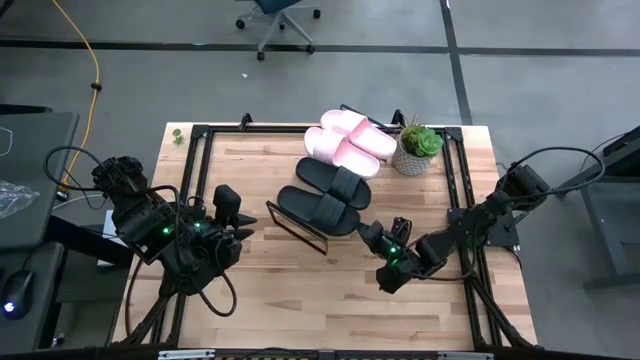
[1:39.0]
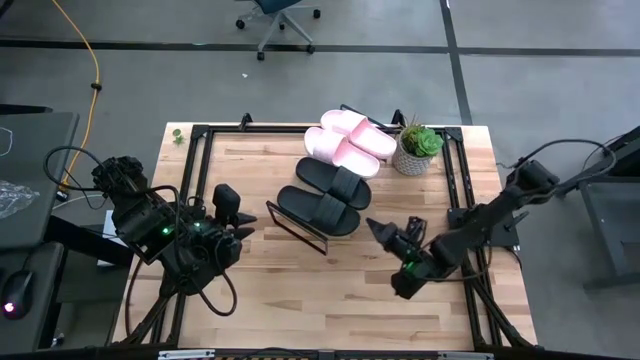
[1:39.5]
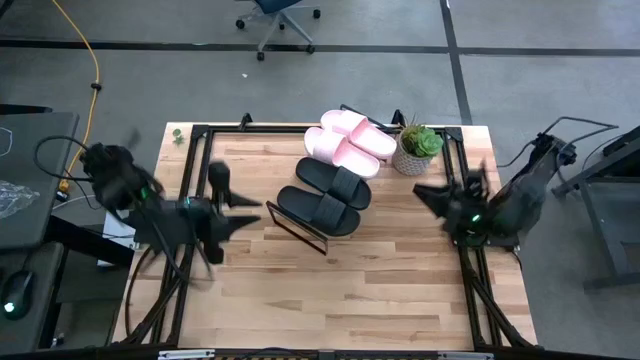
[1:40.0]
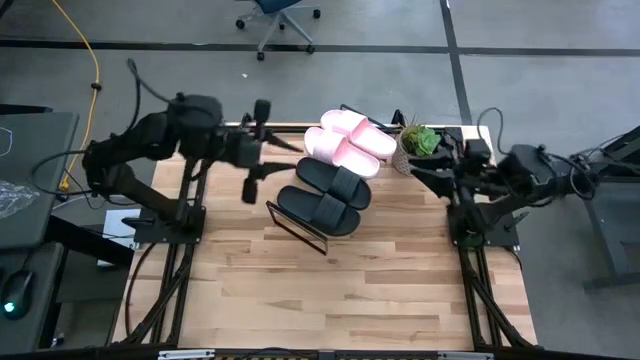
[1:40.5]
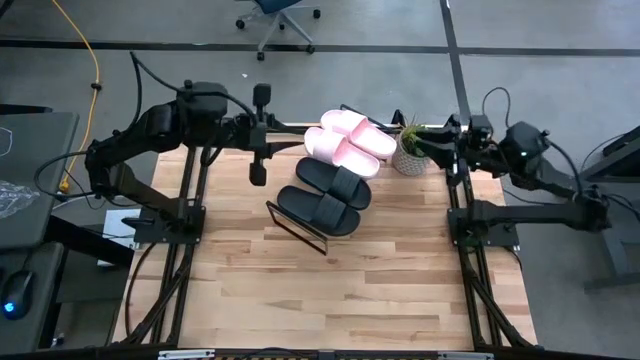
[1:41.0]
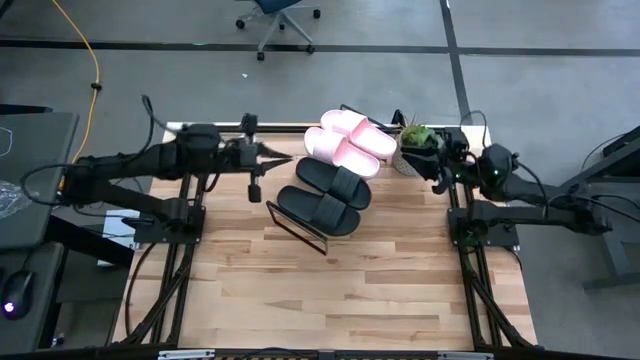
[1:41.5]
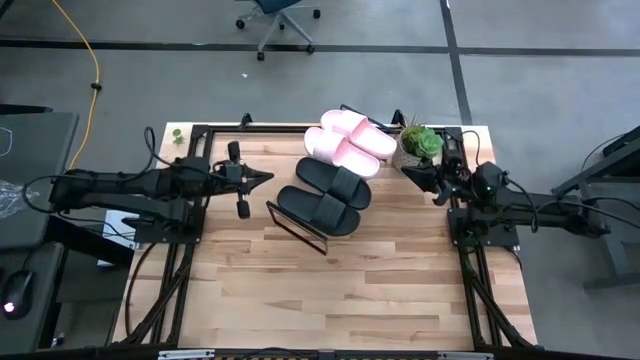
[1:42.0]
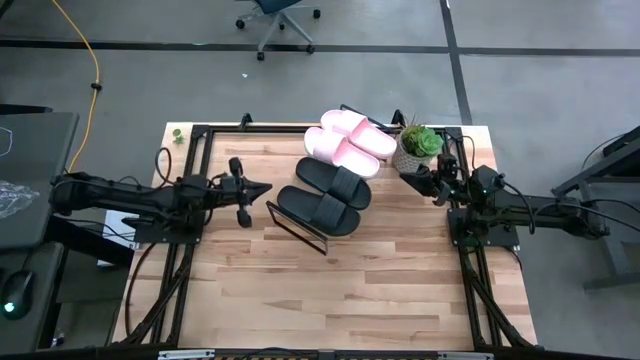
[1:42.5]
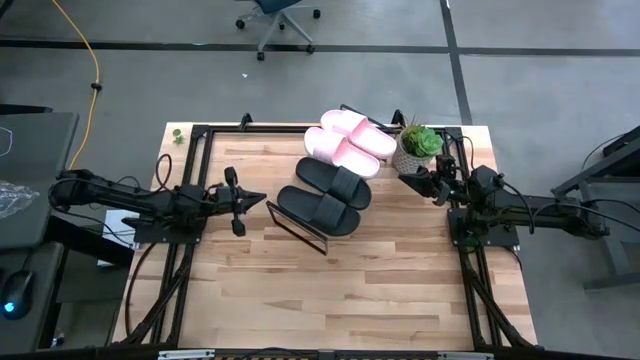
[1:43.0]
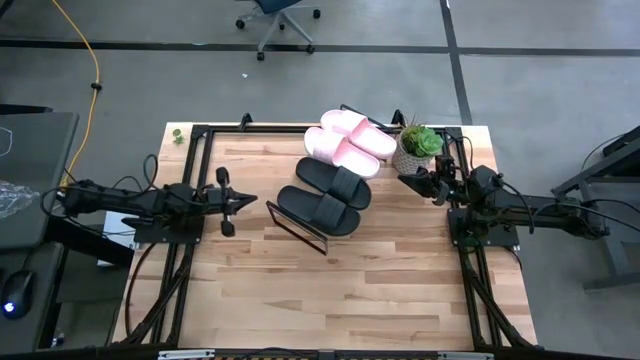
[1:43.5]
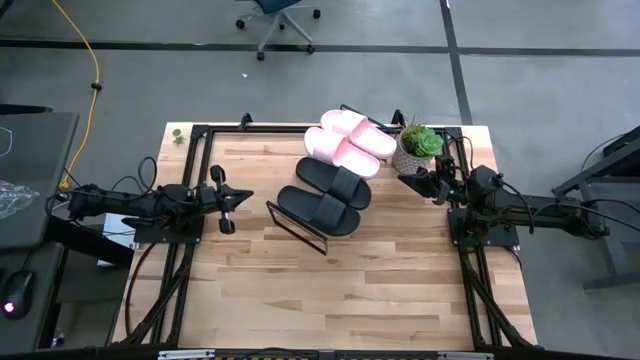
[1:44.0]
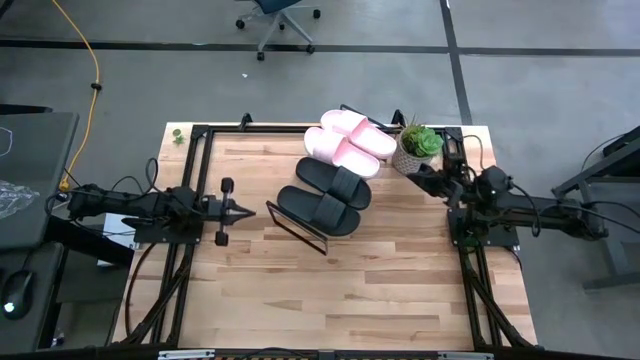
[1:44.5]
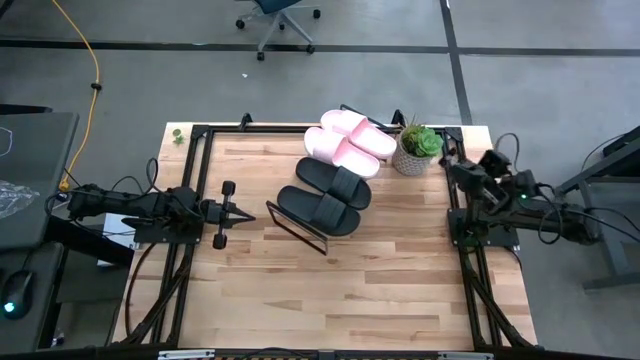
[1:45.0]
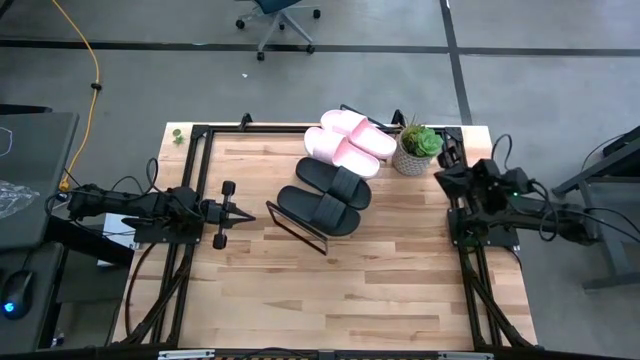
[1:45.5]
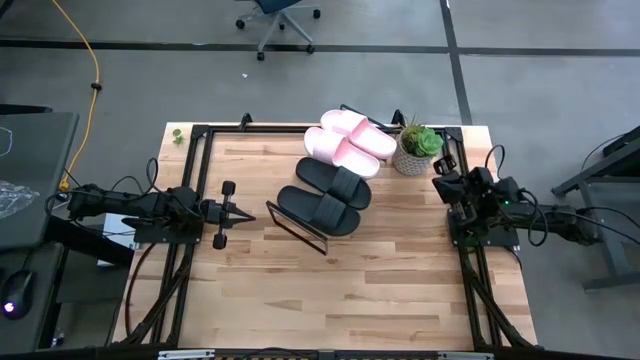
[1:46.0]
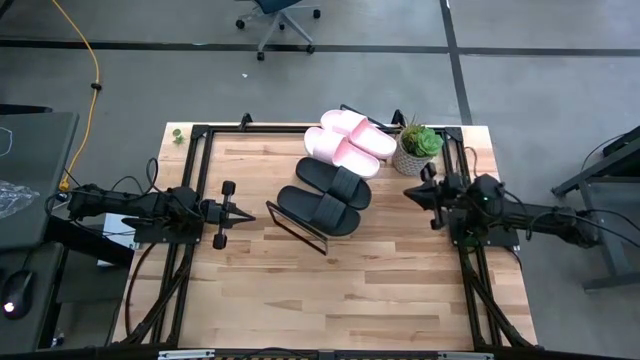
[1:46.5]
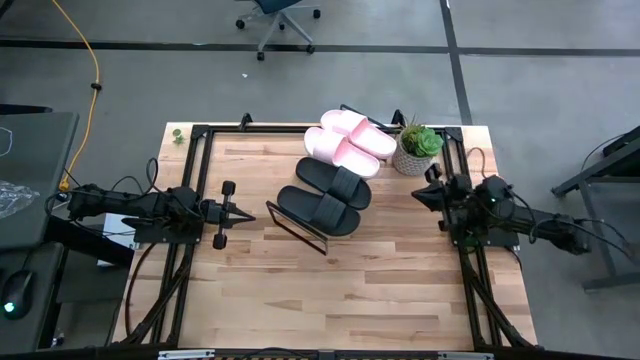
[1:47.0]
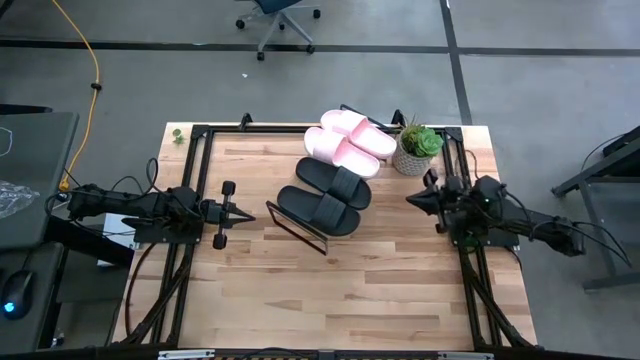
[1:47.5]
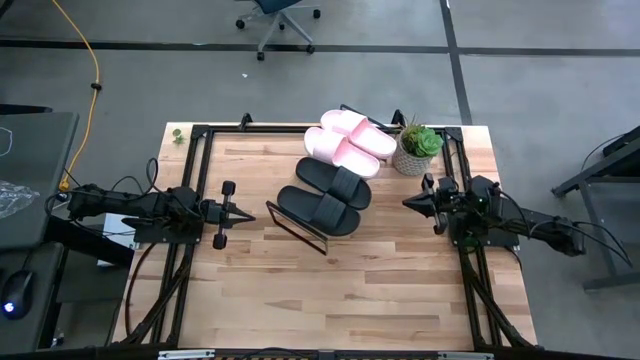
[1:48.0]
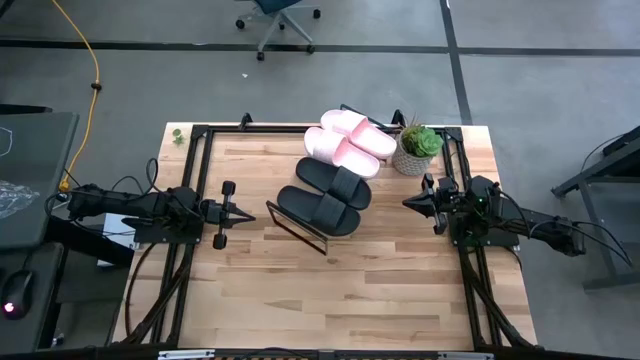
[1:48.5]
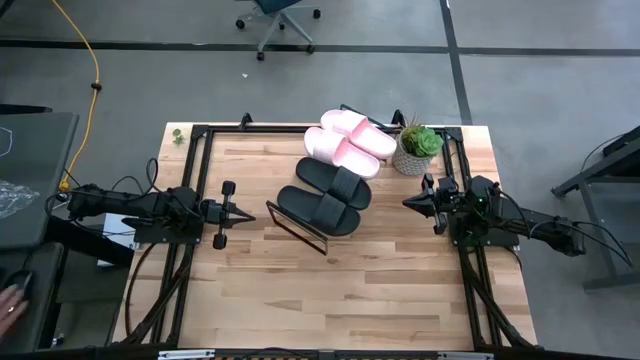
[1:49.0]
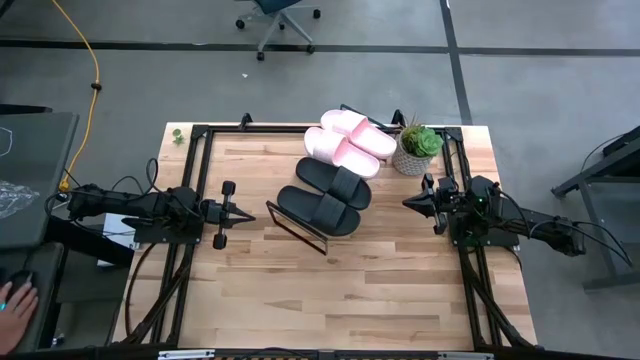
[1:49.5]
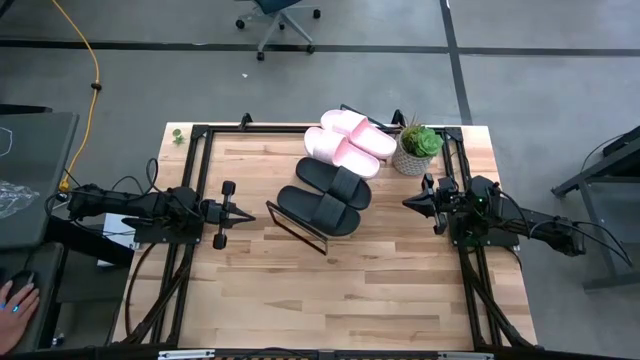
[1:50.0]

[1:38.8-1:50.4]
Task: Pick and place slides into the shelf
Return to Home Position

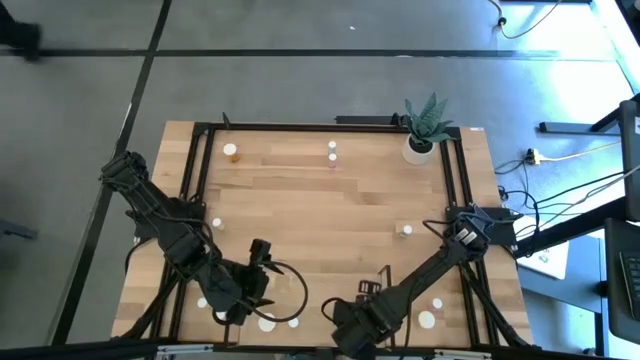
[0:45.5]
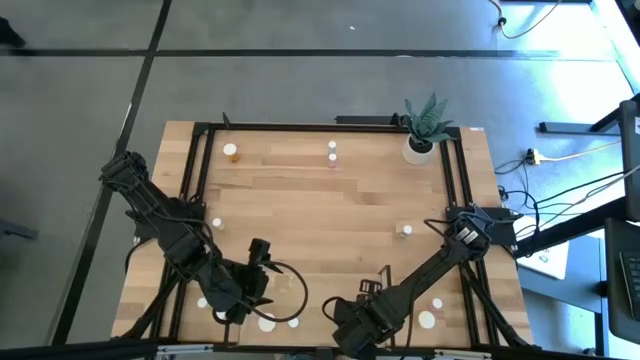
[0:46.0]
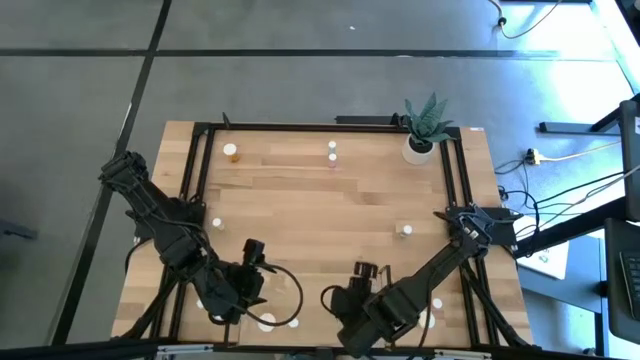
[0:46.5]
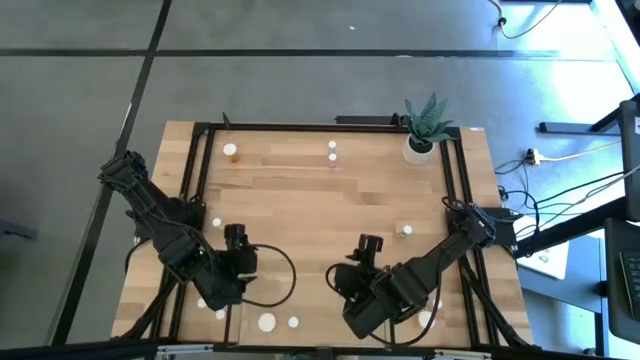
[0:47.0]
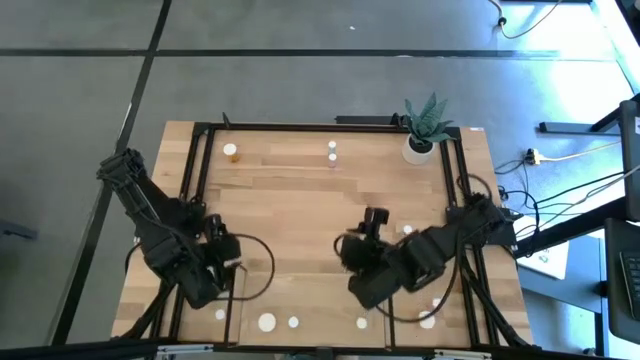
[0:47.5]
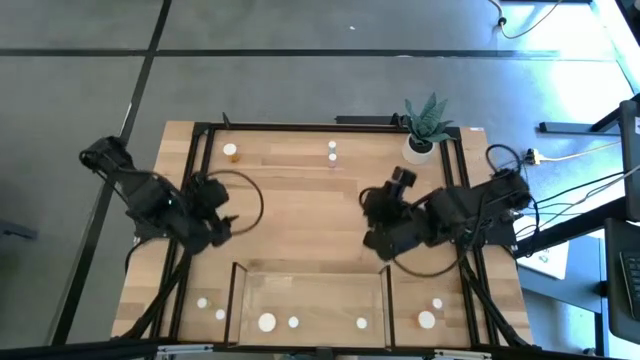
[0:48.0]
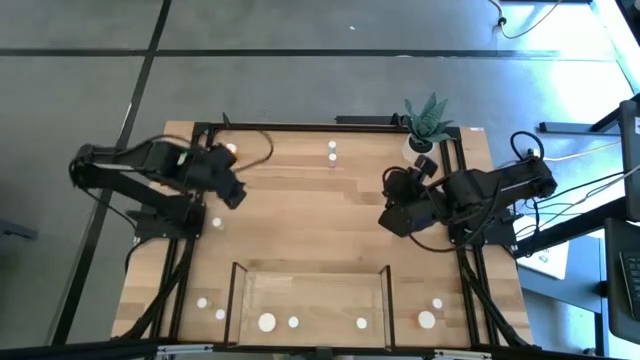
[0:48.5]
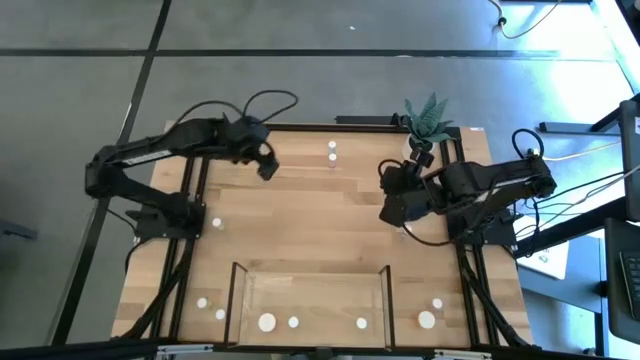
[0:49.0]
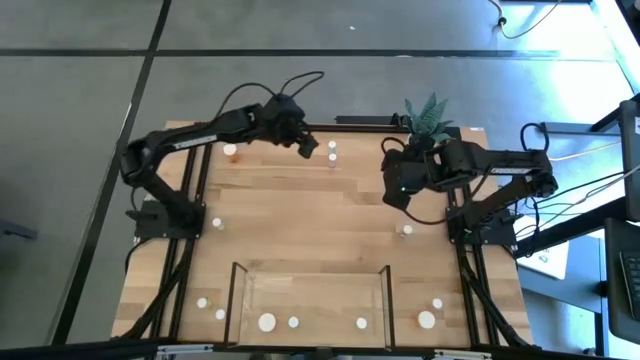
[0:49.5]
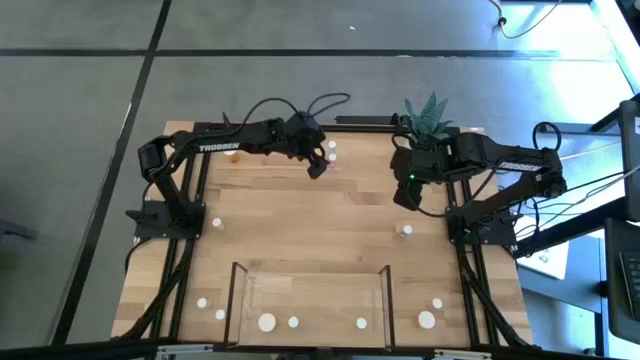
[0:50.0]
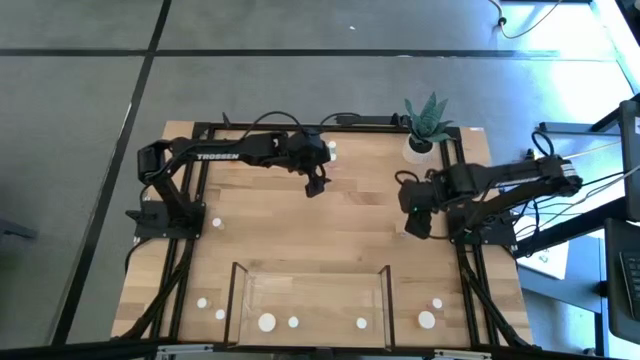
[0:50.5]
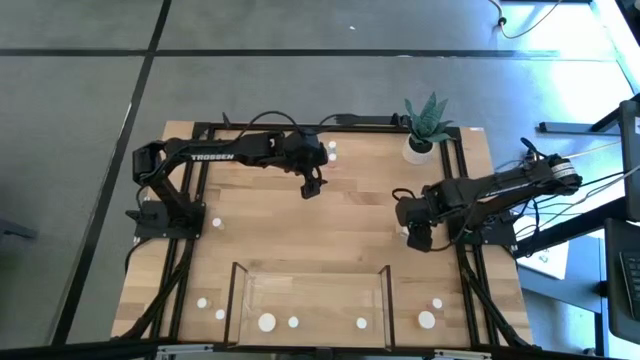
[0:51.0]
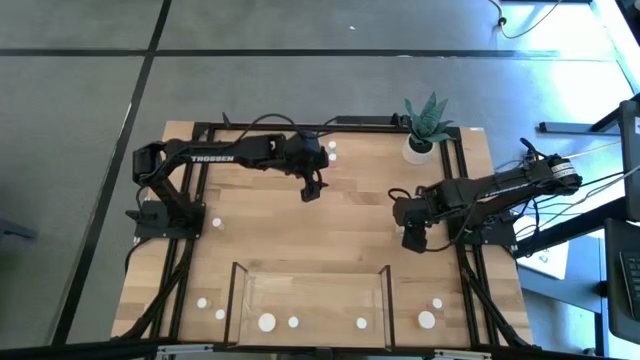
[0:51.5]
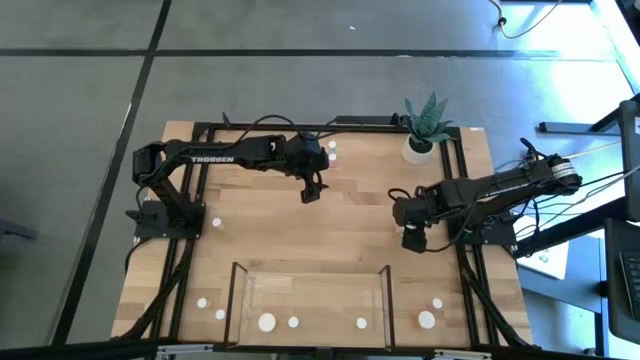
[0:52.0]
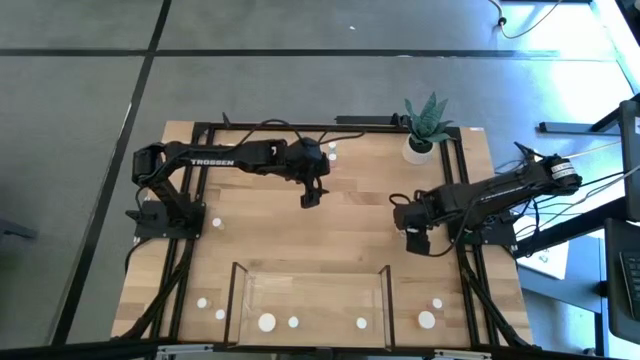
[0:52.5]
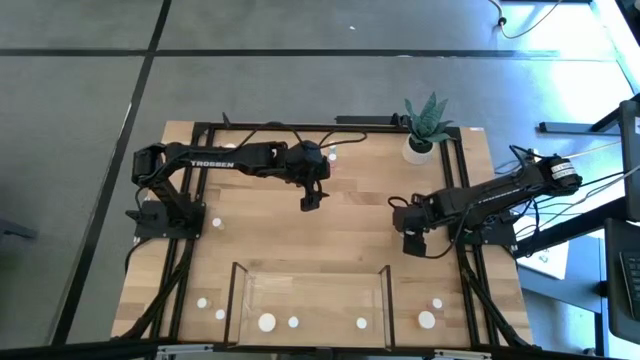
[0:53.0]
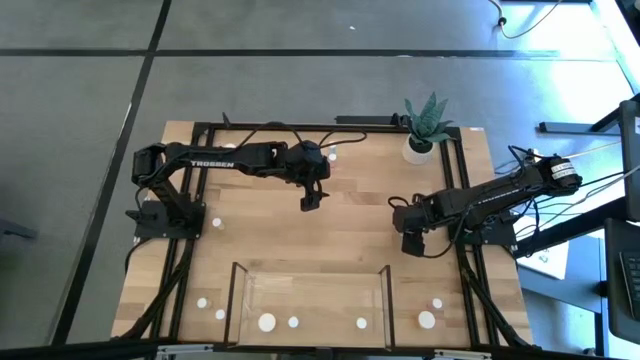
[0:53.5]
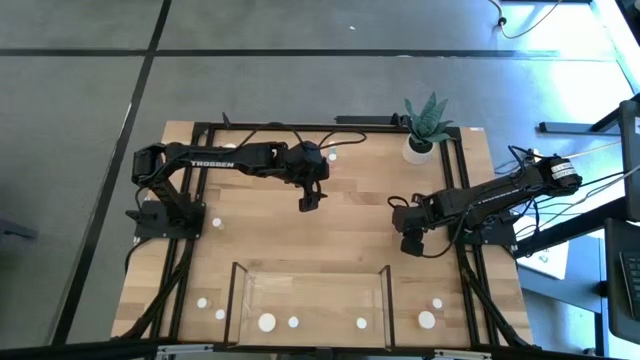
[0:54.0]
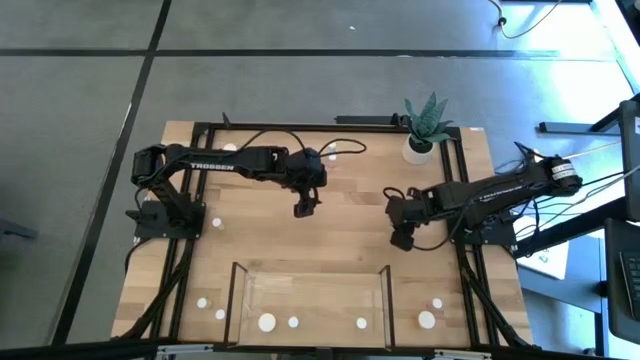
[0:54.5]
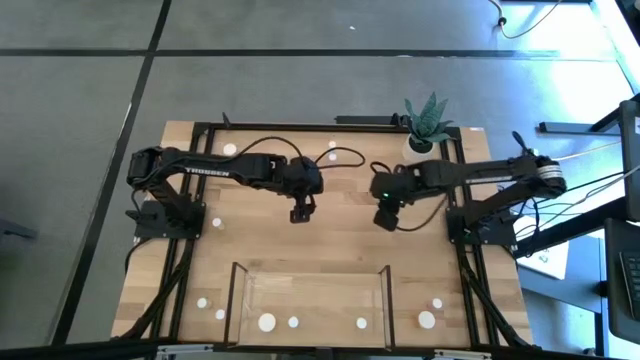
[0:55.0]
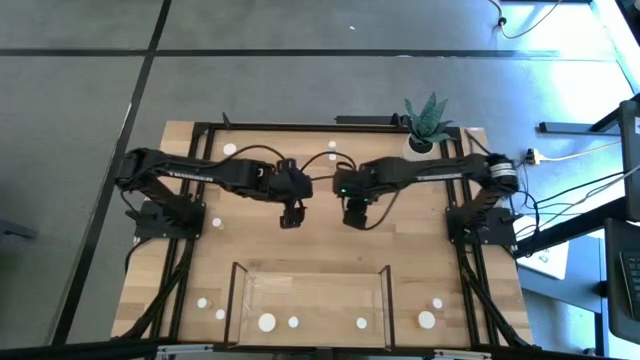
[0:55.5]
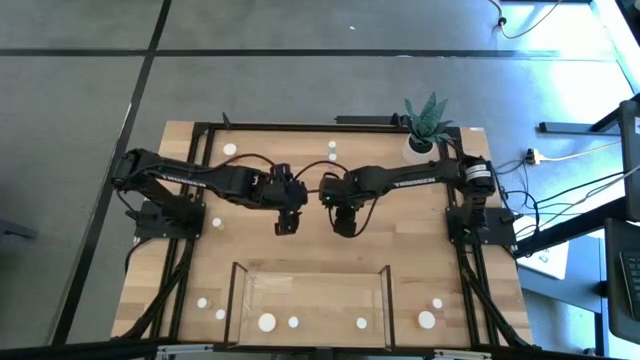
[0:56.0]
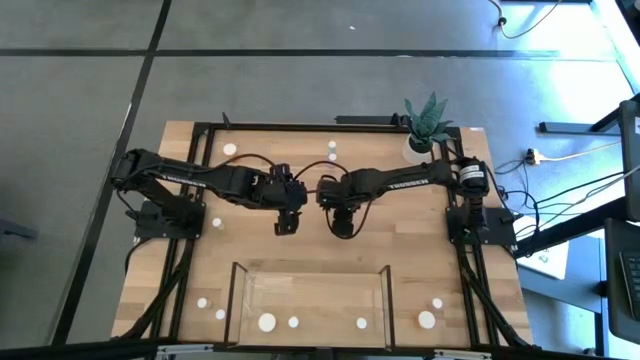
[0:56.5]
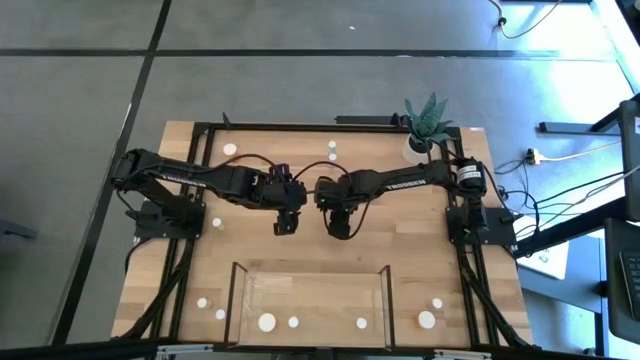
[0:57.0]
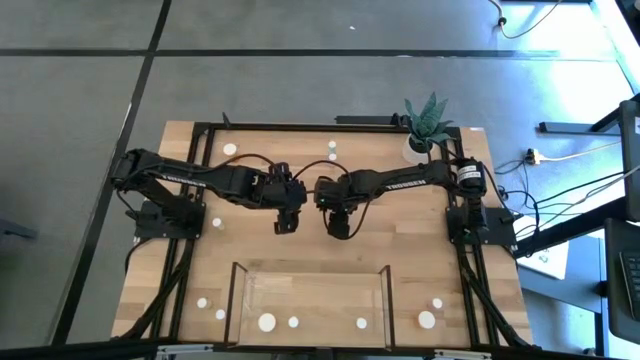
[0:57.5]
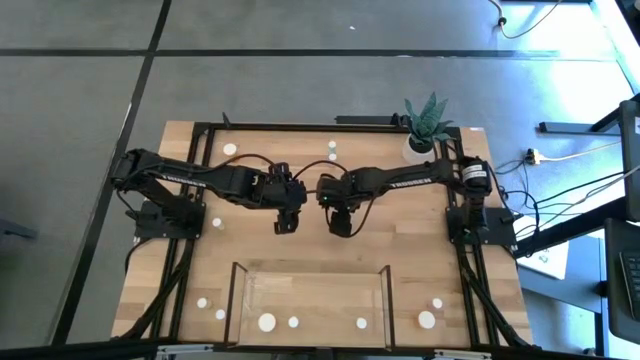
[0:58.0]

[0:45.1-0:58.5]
Task: Pick and place medicine bottles onto shelf by color
Put the bottom blue pill bottle on the shelf aligned with the other blue pill bottle
